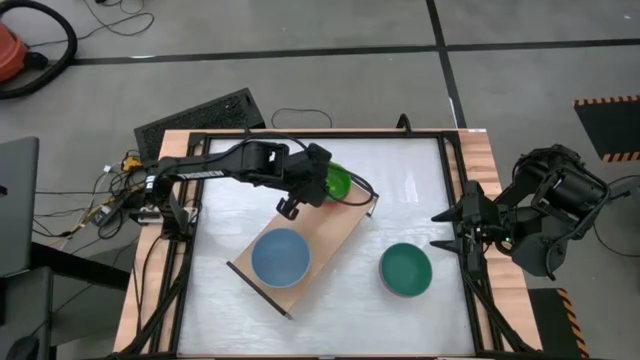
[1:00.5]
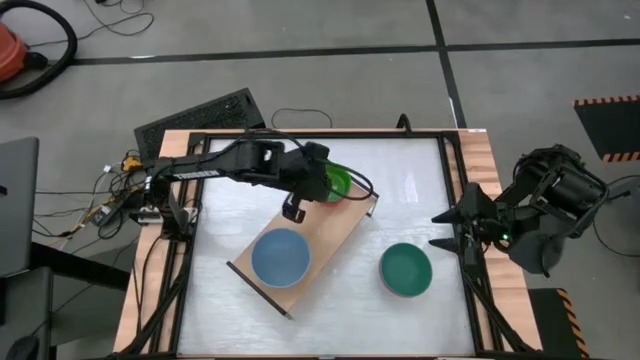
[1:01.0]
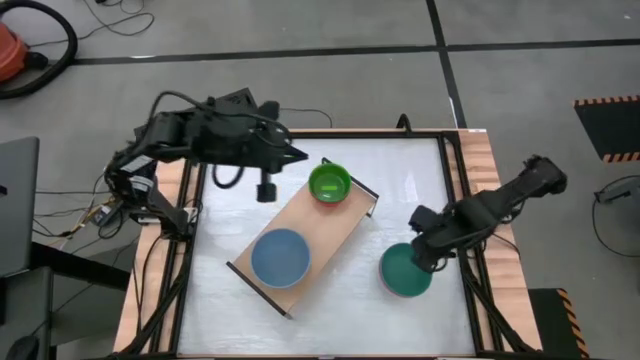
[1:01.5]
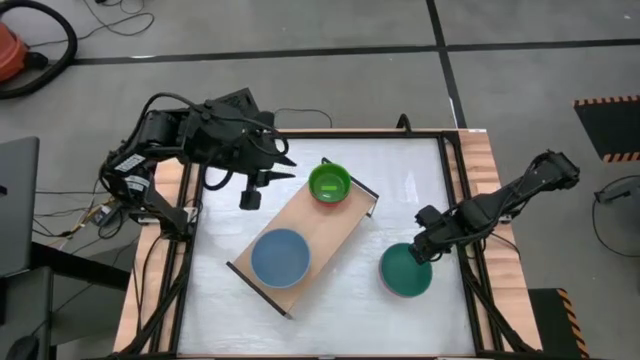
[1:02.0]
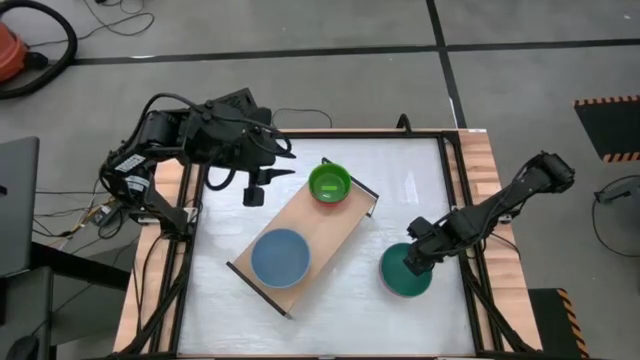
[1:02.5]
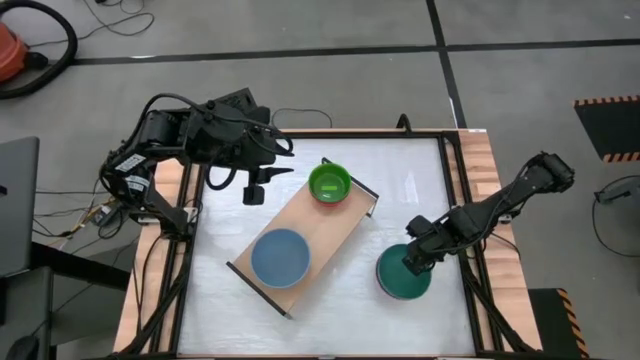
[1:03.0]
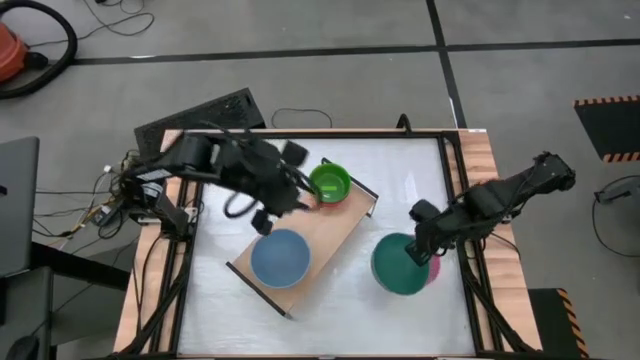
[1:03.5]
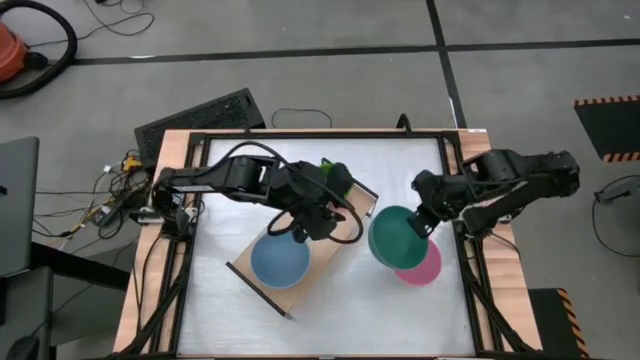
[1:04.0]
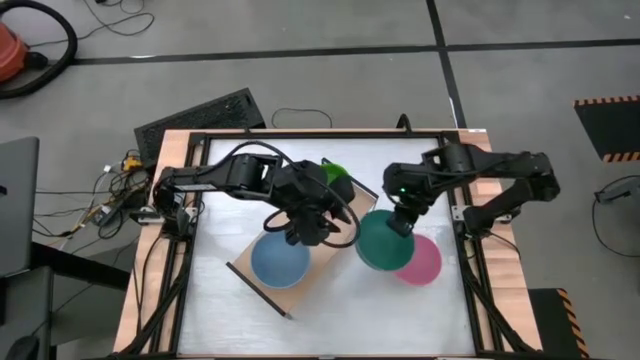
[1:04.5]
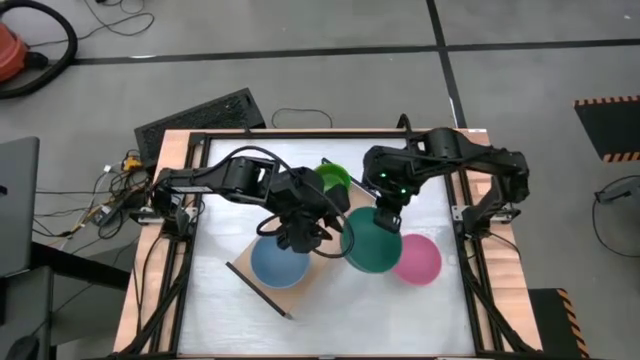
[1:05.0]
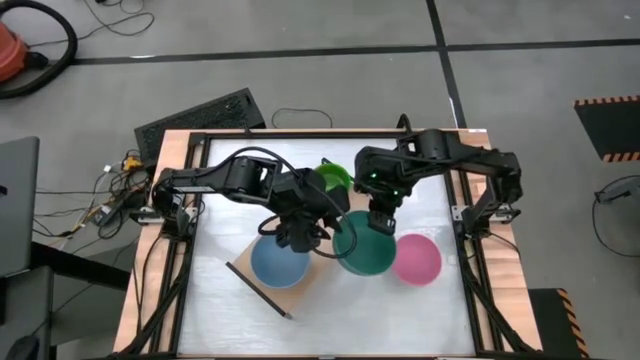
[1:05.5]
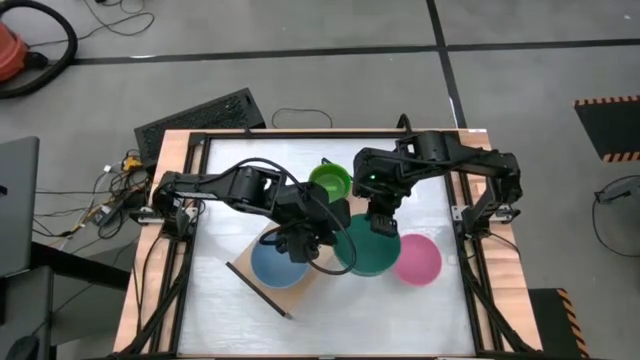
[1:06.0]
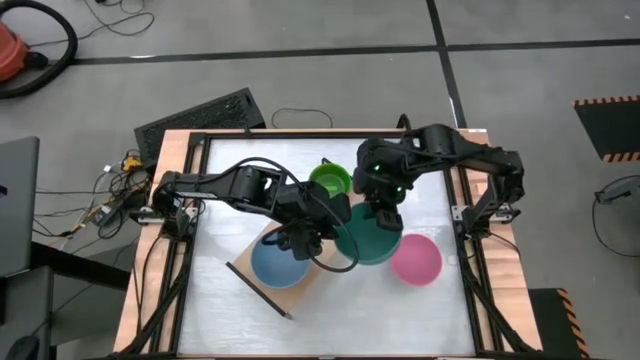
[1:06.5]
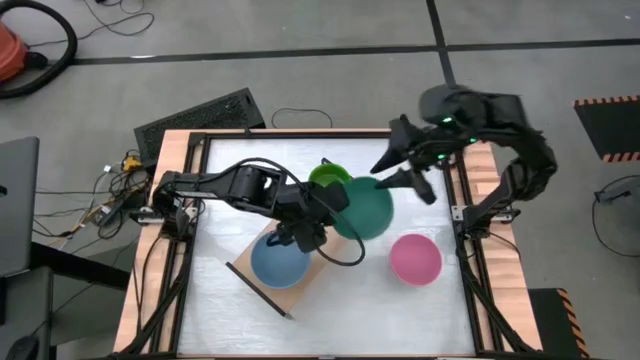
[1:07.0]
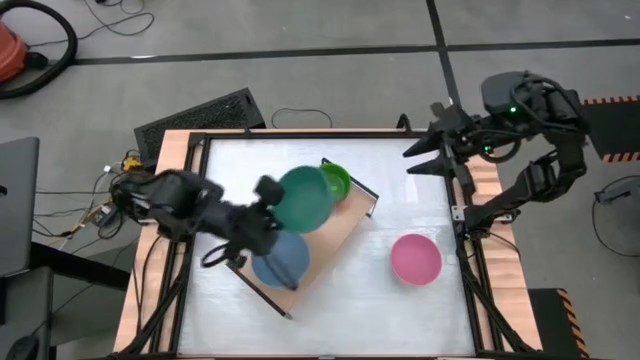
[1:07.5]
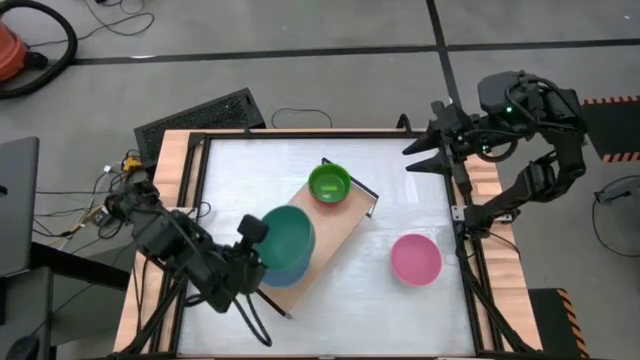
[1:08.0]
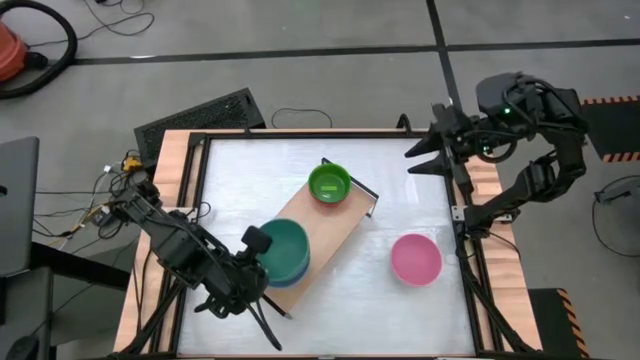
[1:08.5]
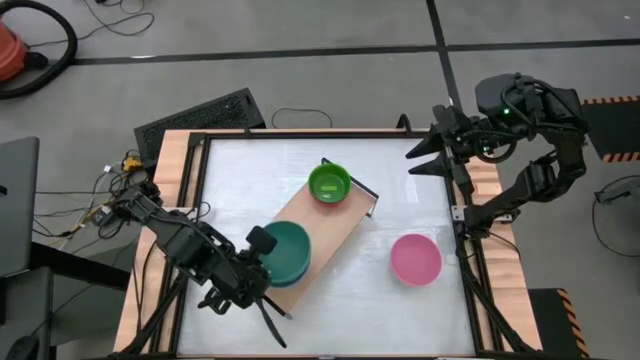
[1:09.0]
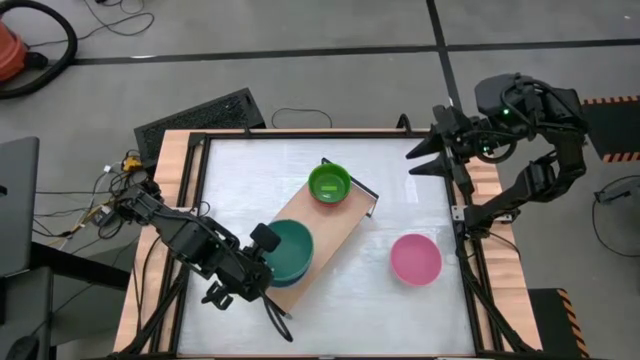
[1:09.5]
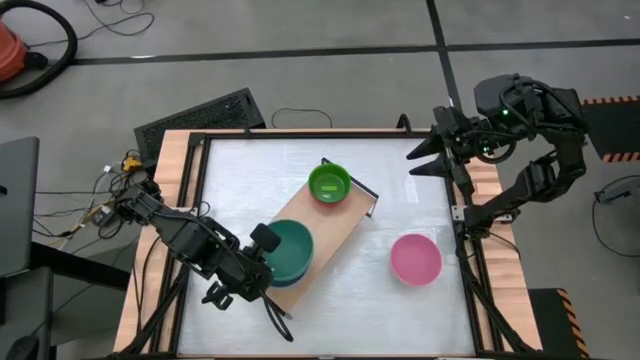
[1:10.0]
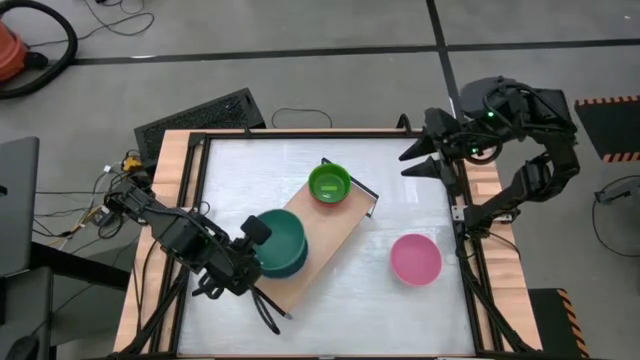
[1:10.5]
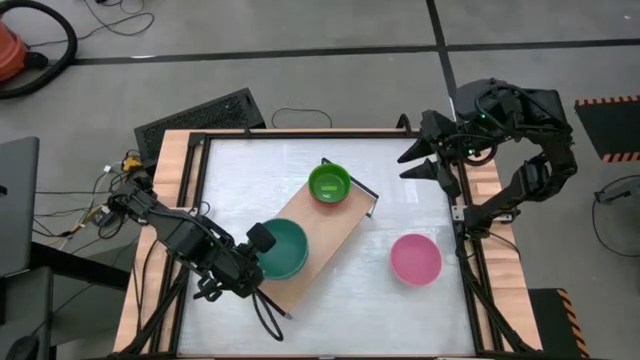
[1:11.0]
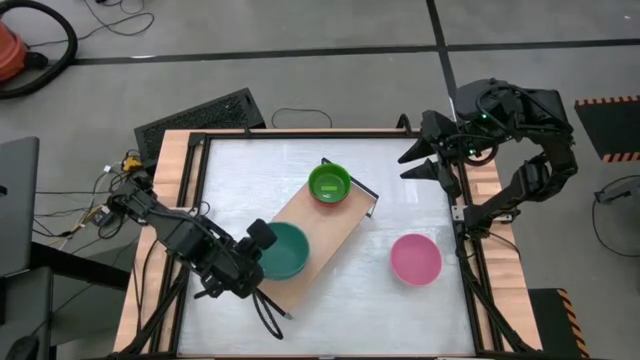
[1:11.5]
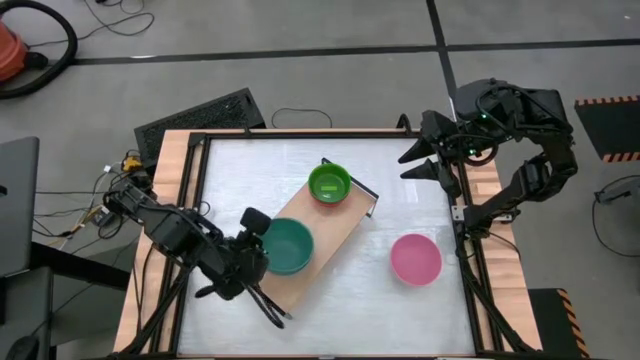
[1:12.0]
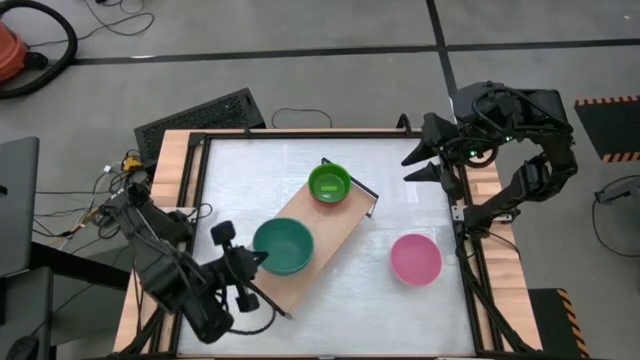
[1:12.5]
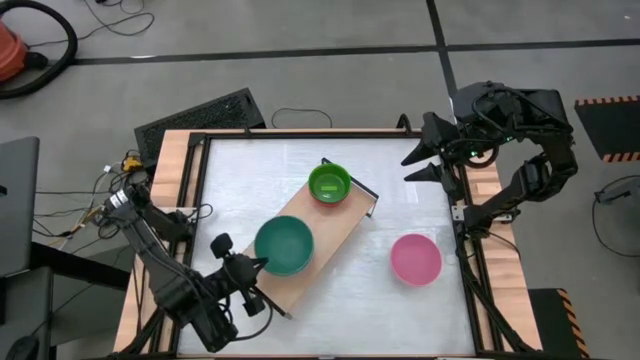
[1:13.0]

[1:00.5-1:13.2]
Task: Place and stack bowls onto a shelf
Stack the green bowl onto the blue bowl on the shelf

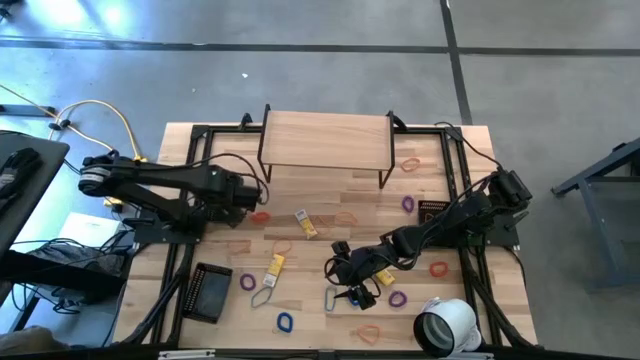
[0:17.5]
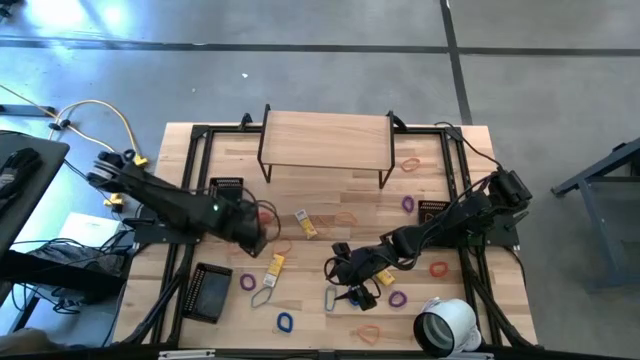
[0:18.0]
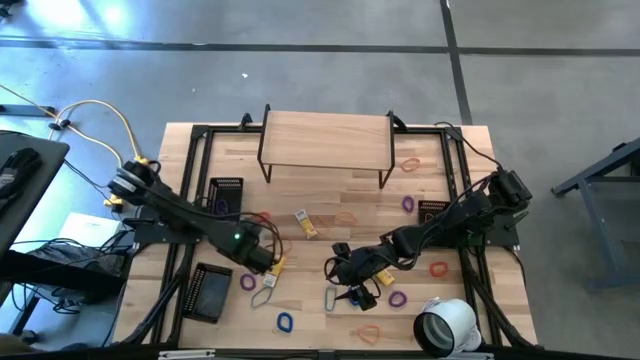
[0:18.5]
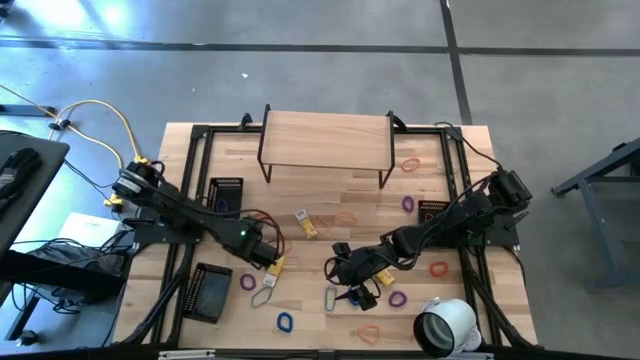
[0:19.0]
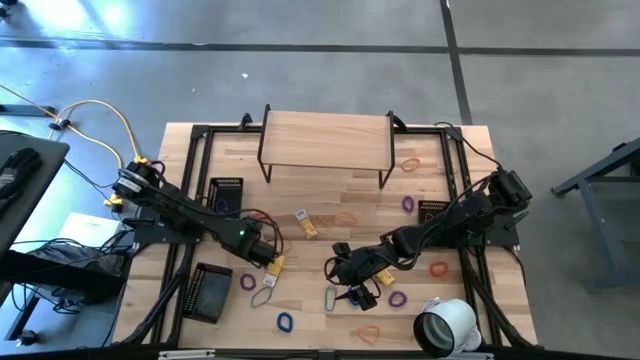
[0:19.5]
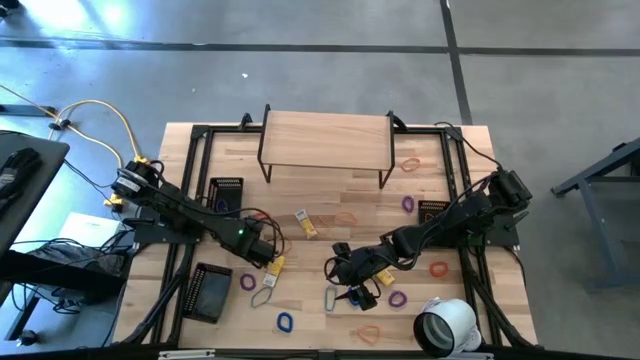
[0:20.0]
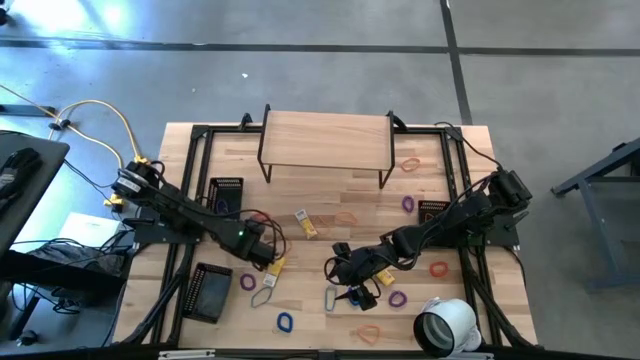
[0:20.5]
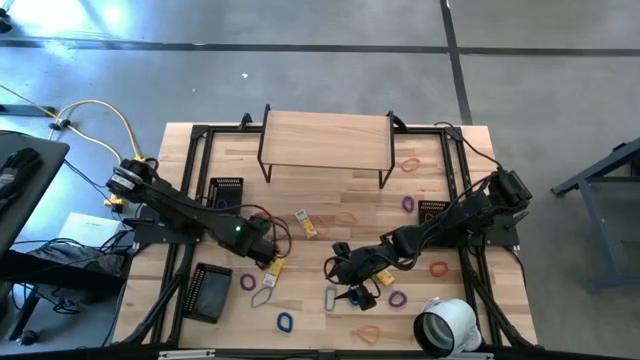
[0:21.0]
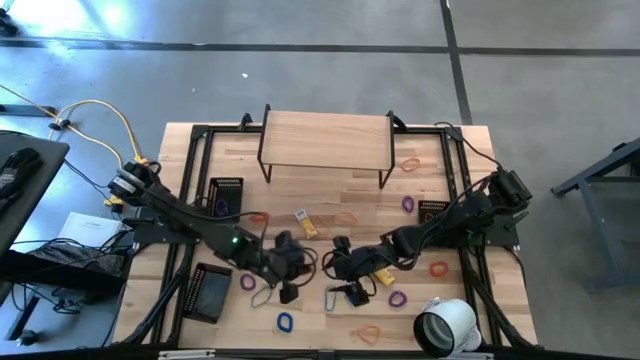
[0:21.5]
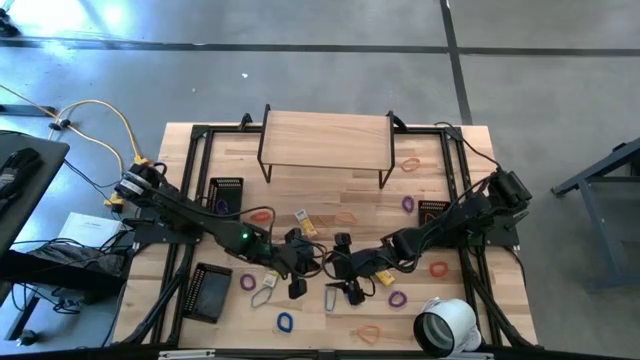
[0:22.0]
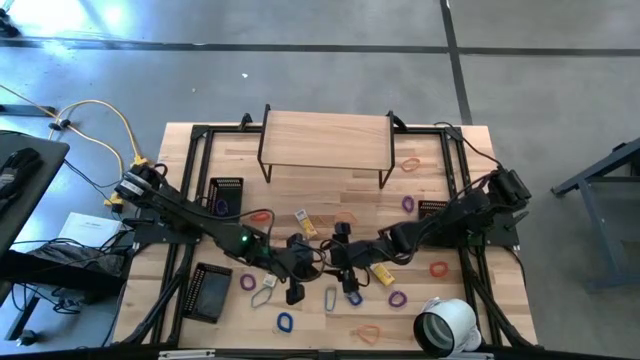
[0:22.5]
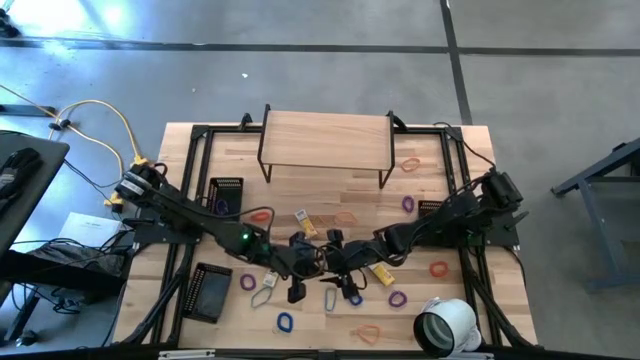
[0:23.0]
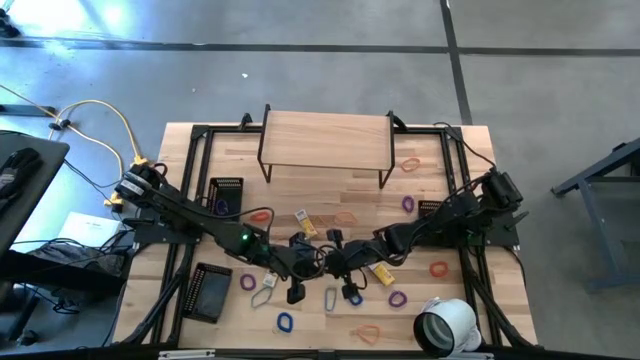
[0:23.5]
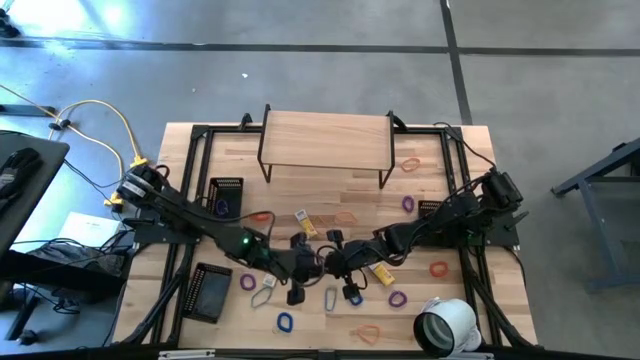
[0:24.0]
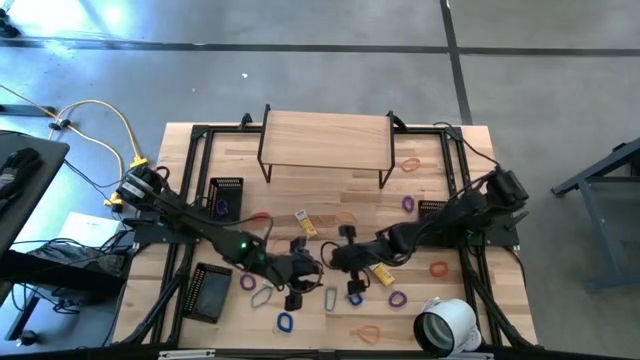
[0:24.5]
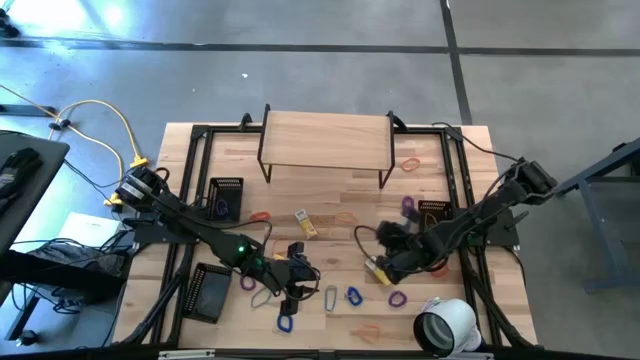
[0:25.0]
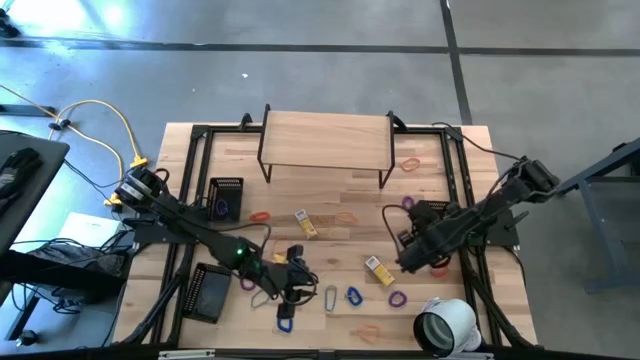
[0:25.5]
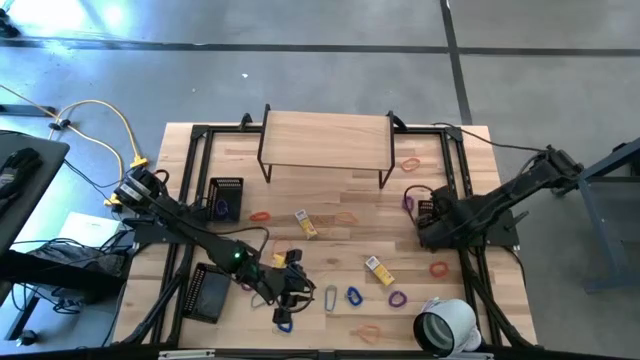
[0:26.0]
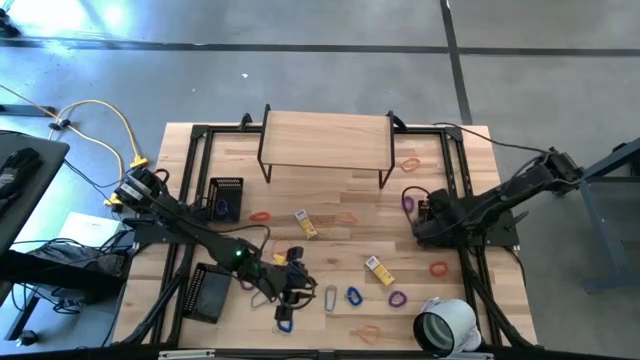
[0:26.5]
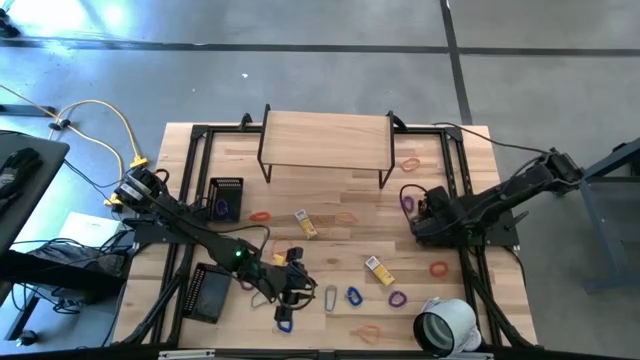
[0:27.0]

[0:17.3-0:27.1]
Task: Pick & Place Office Desk Supplies
Put the orange rubber band into the top right black bin
